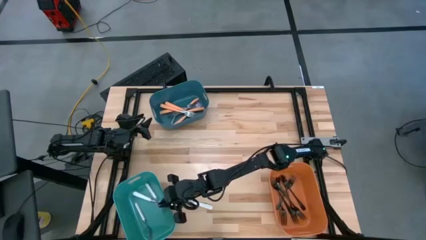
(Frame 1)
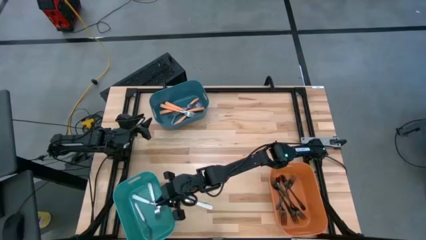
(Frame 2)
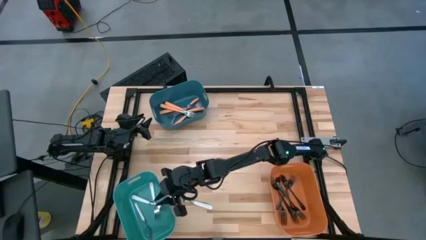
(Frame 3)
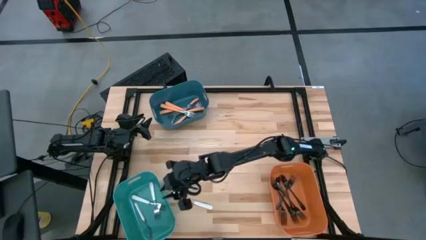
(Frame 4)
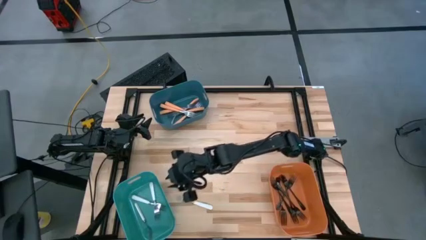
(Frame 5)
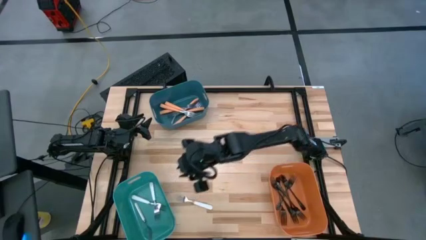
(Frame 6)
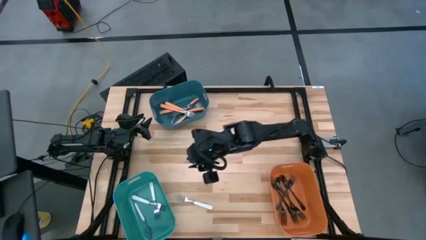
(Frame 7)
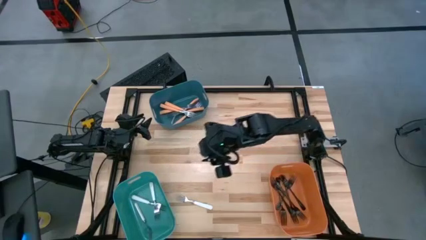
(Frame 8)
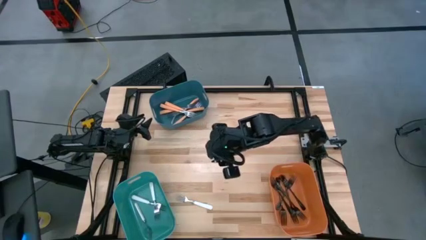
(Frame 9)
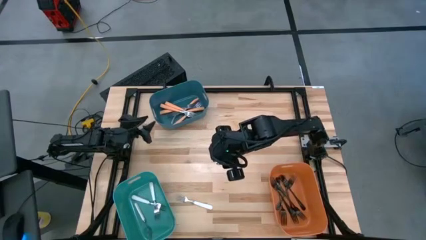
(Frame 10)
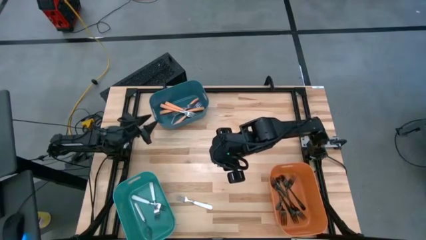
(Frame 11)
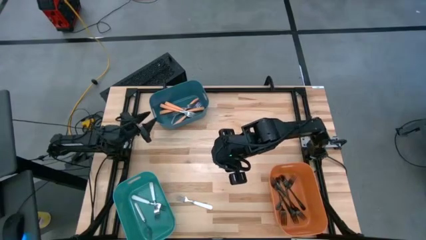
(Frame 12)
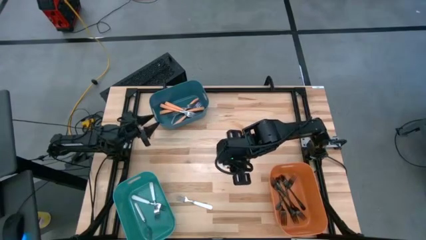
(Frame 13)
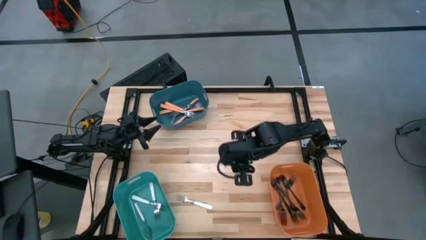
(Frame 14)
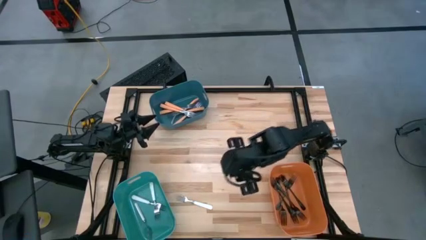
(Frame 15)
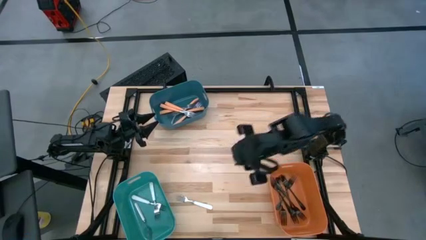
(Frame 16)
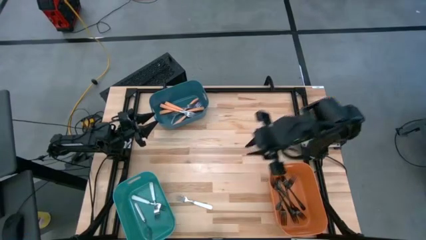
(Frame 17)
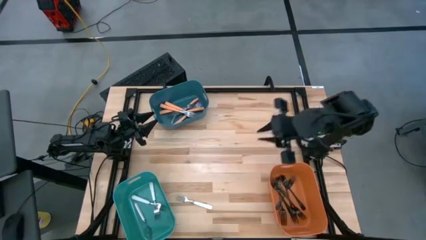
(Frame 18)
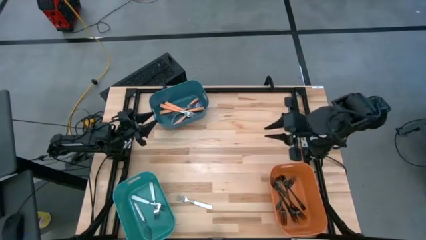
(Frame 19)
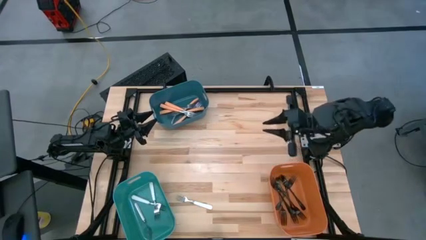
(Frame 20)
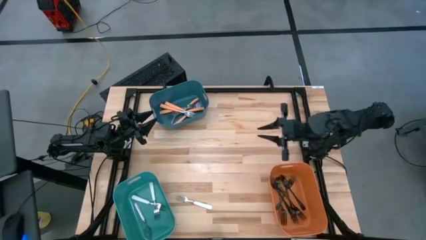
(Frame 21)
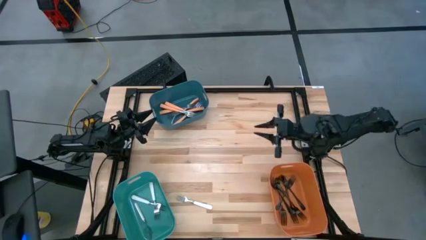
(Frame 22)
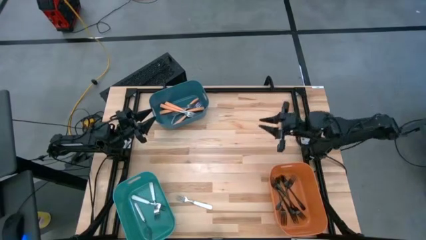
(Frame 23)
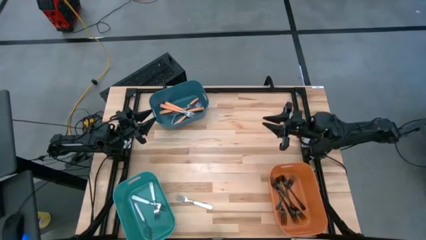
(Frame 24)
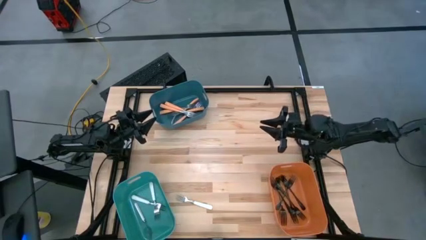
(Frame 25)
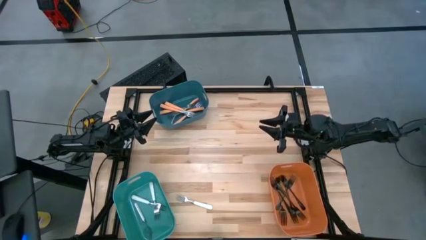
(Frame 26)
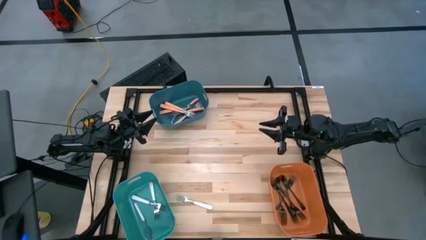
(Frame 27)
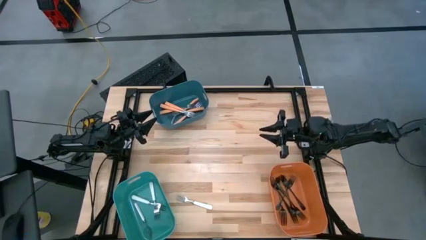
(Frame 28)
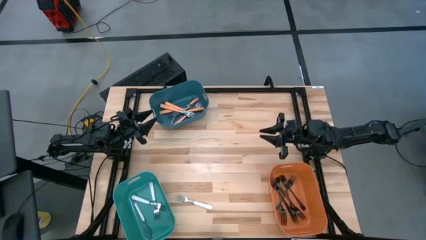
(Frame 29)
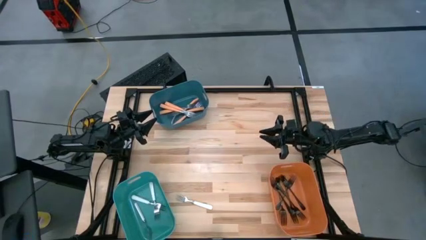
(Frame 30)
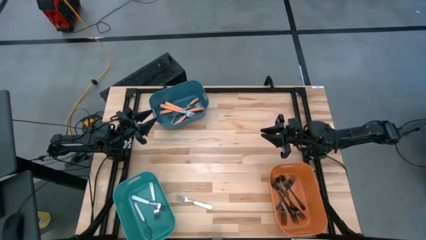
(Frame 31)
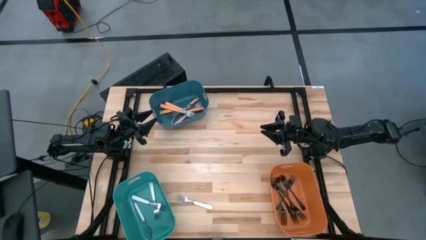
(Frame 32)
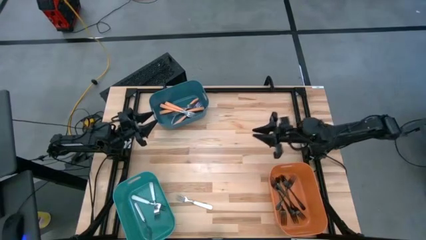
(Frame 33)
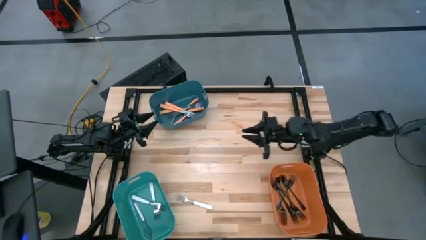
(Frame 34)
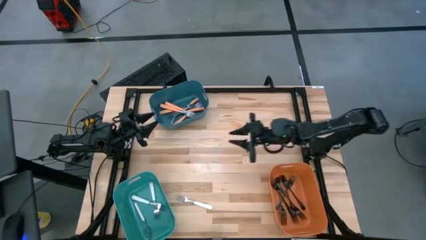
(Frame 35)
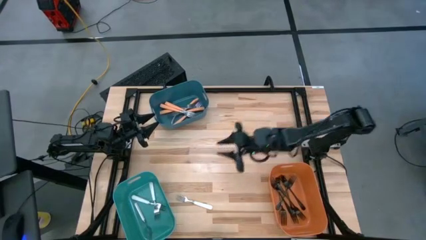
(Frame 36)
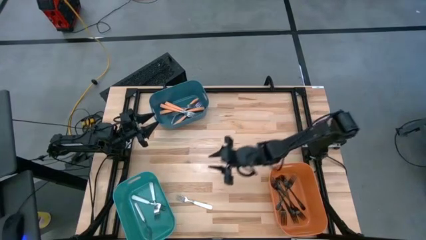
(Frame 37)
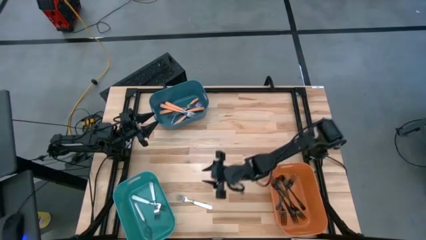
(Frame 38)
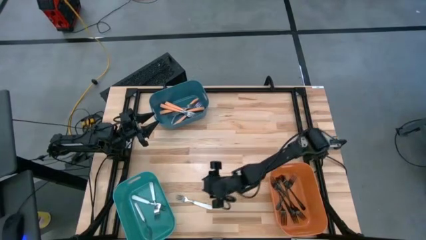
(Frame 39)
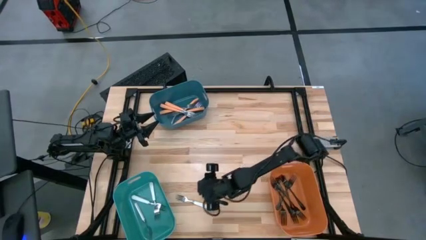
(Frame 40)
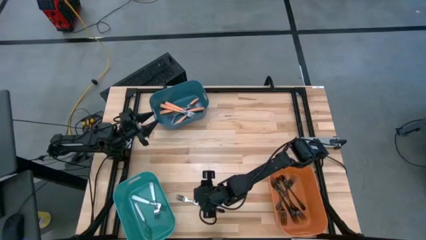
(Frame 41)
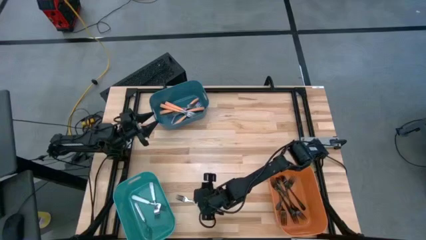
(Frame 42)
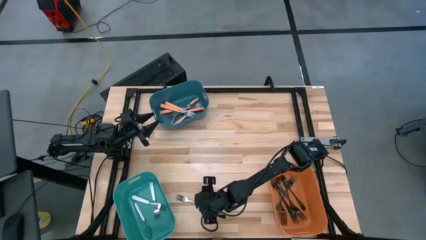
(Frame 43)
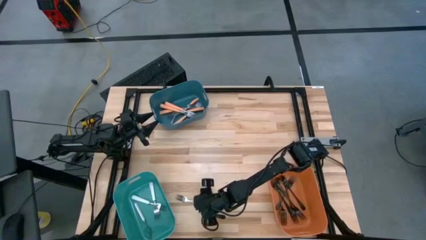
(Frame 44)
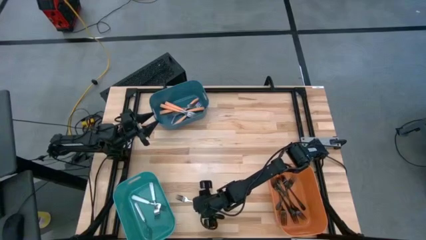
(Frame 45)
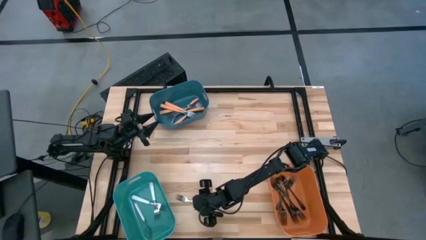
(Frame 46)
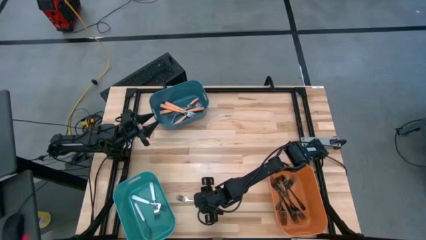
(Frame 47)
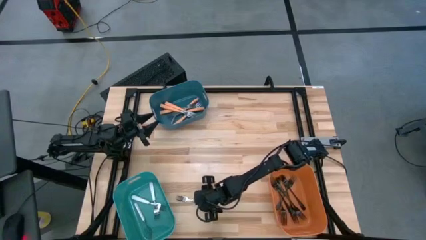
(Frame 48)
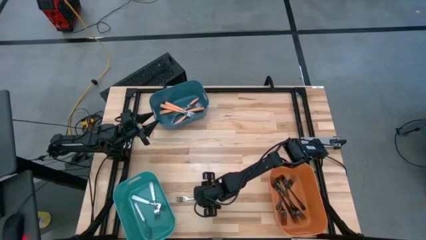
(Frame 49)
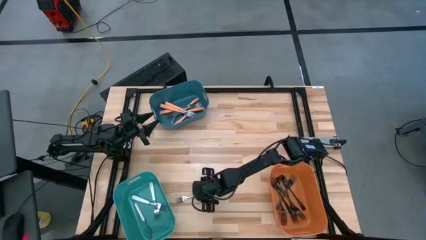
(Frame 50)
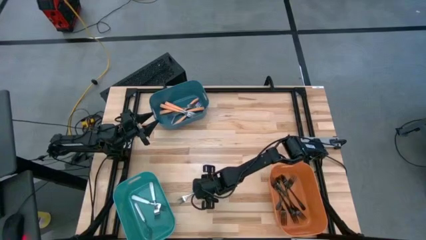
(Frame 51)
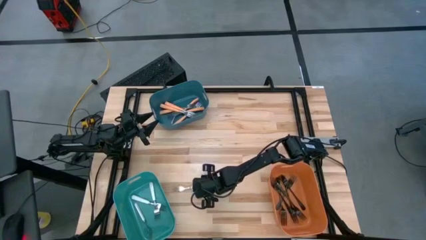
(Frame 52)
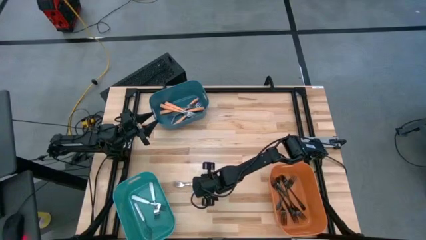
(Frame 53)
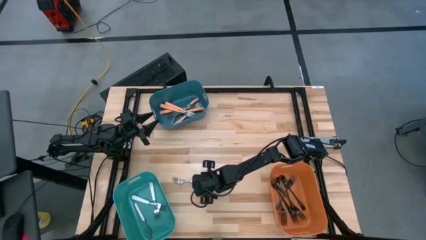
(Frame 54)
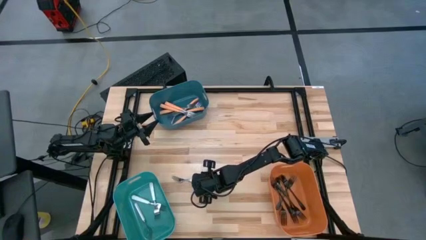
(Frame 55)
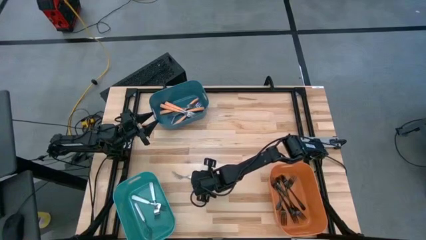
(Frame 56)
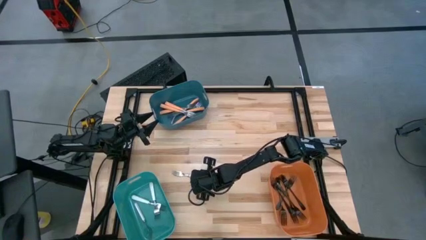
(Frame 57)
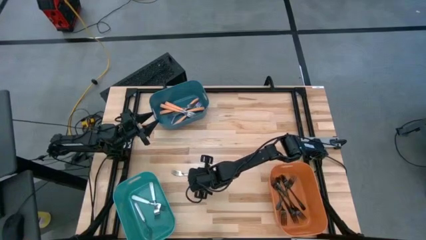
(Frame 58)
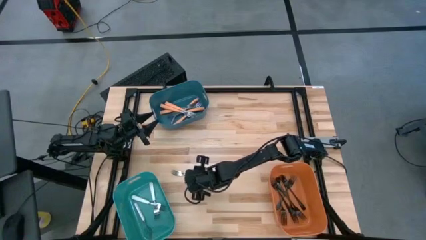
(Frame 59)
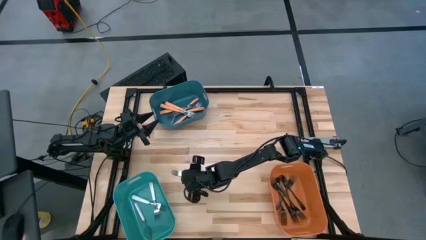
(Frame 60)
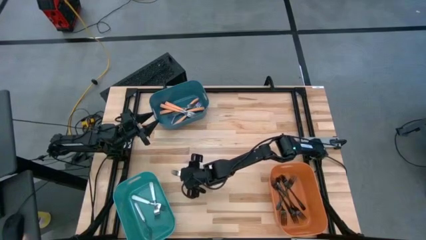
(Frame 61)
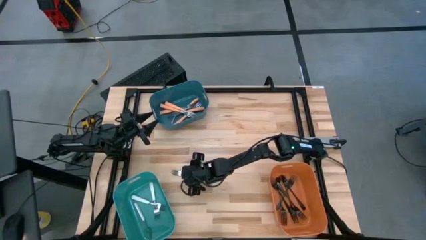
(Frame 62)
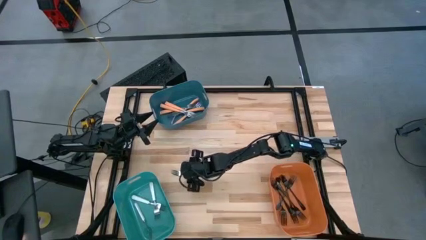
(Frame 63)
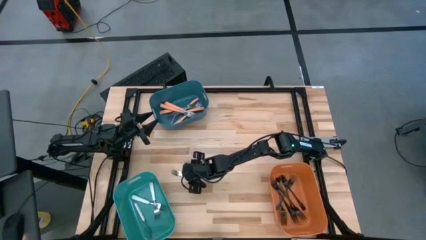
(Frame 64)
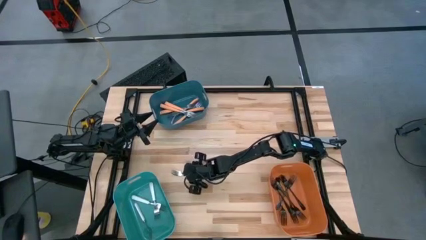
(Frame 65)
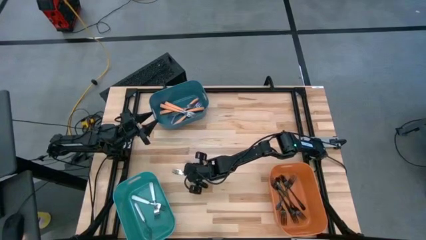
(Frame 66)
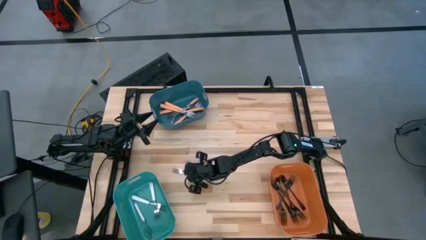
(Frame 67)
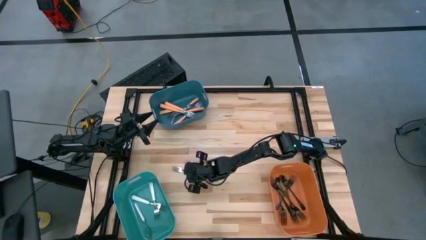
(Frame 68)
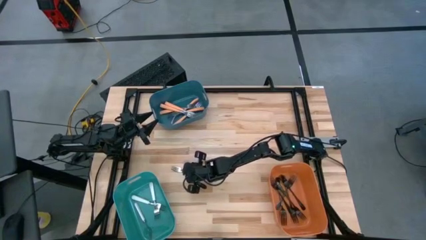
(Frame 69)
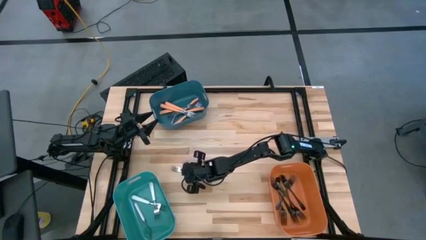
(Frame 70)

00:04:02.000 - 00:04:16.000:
Task: Sort silverware by color (type)
Put the white fork into the green bin
